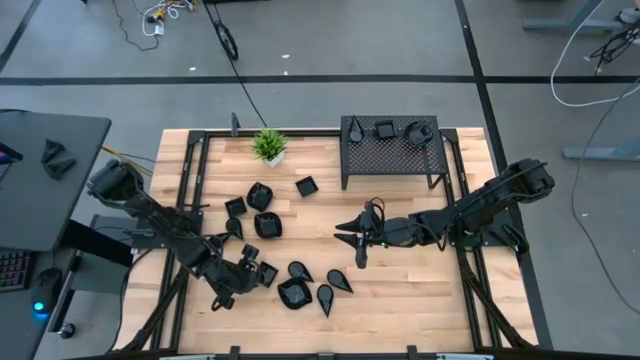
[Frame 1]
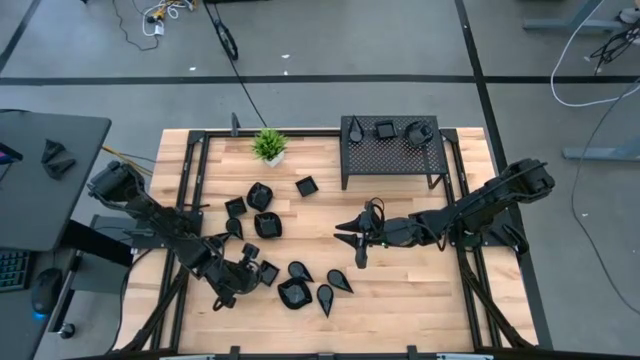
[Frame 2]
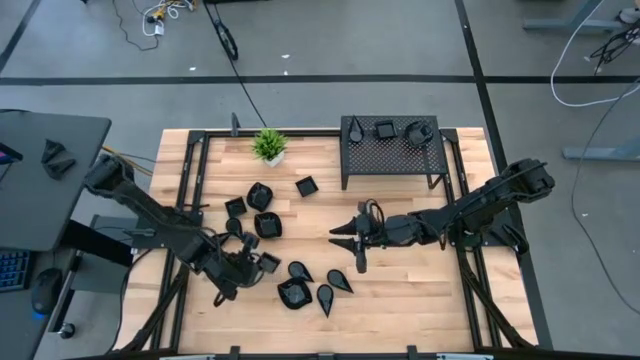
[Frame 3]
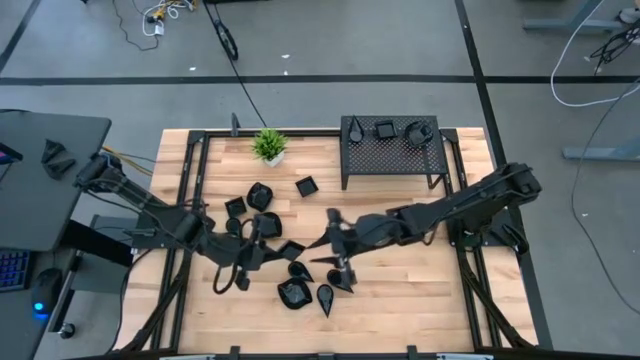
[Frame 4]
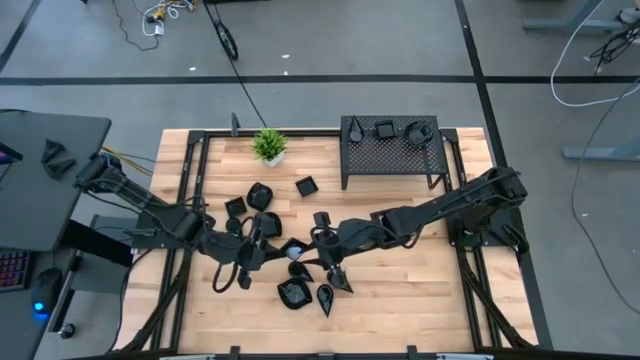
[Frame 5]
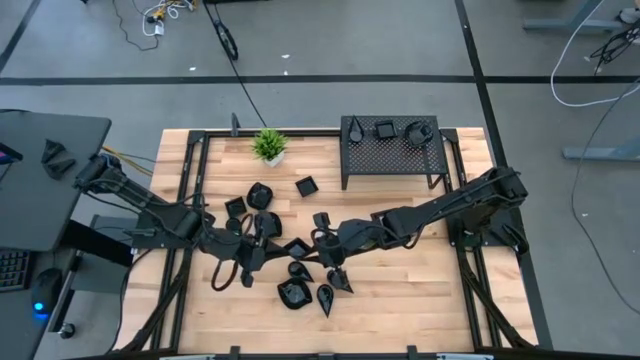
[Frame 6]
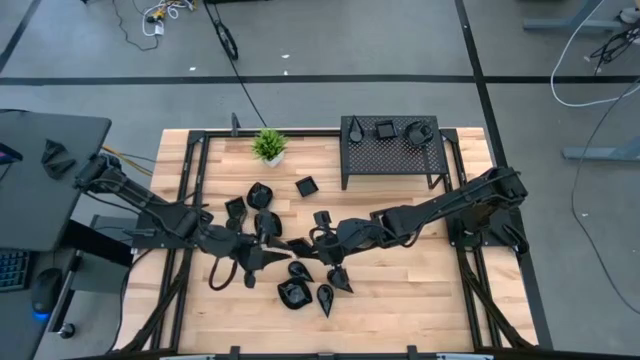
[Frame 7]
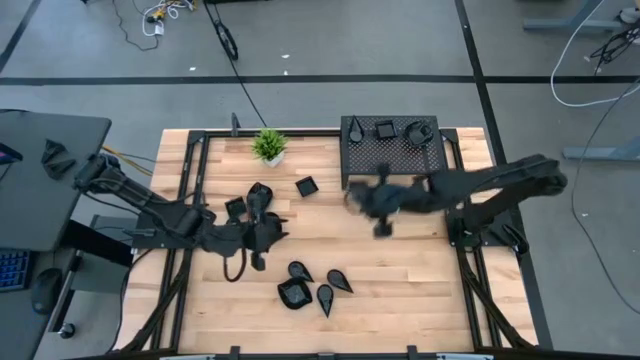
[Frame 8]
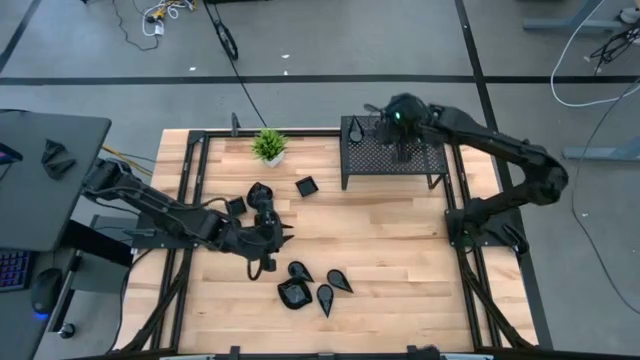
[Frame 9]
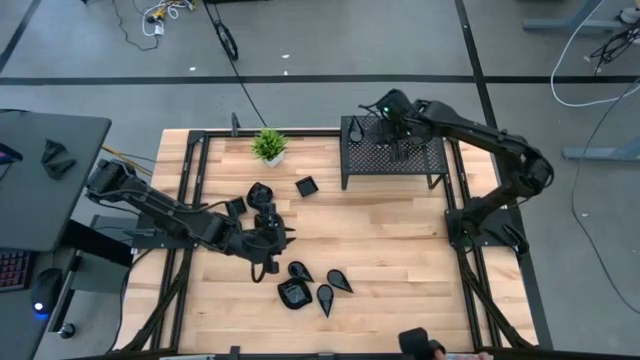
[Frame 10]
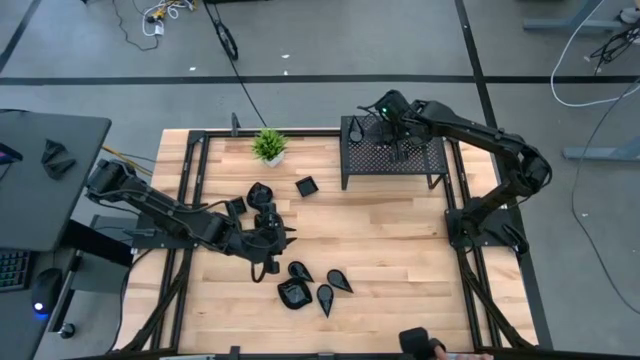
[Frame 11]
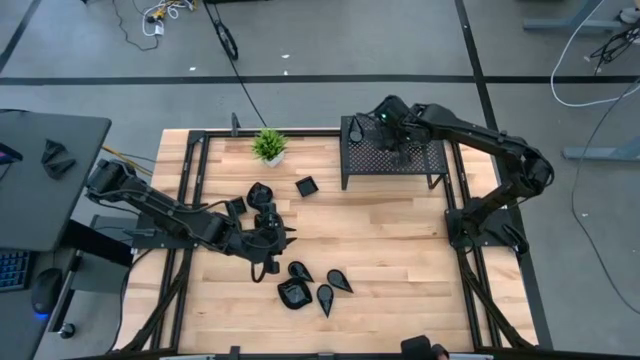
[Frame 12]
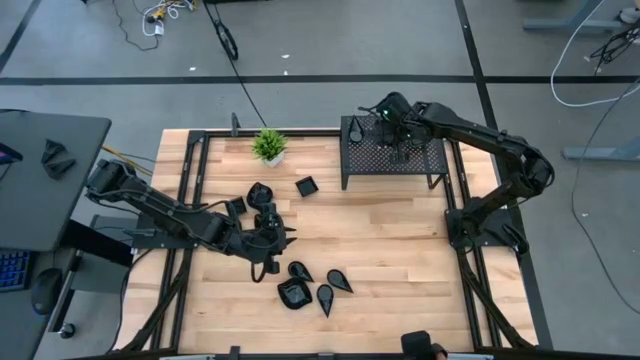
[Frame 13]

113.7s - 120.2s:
Task: Pick & Place Mini shaped plates
Stack the black square plate on top of the black square plate on the shelf

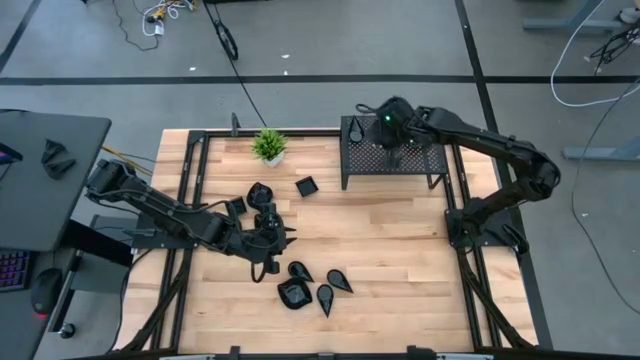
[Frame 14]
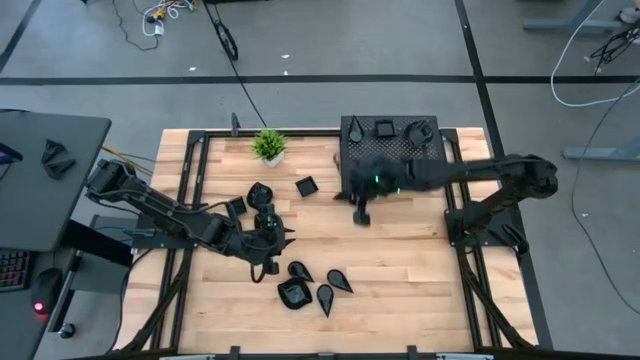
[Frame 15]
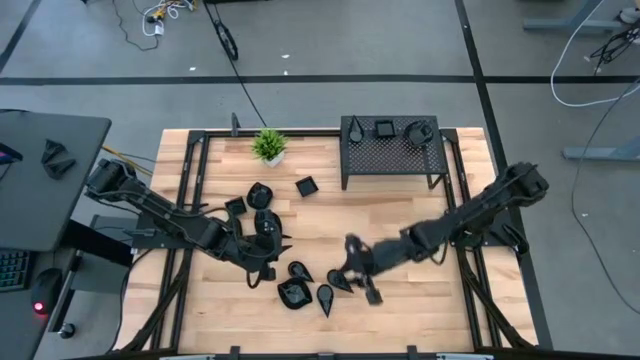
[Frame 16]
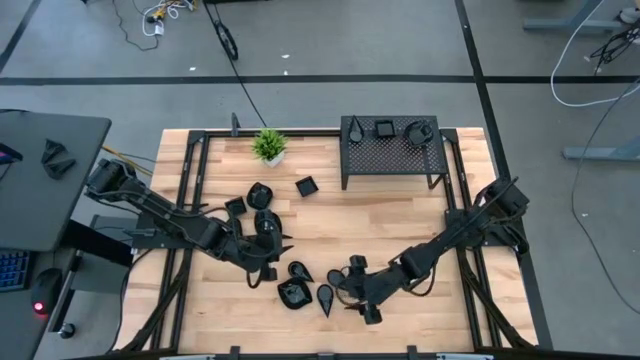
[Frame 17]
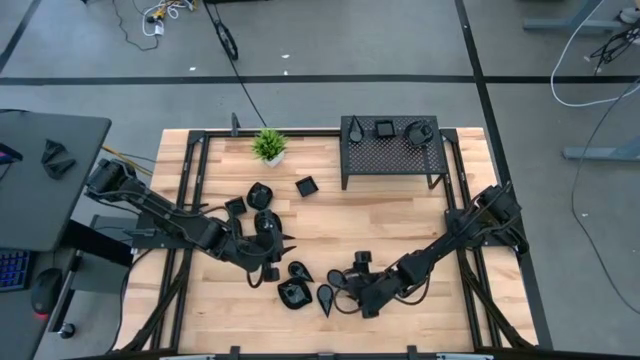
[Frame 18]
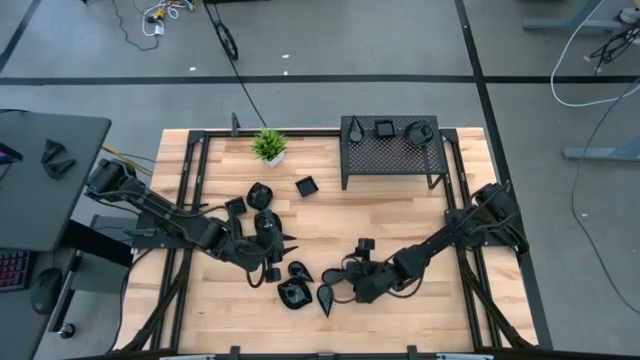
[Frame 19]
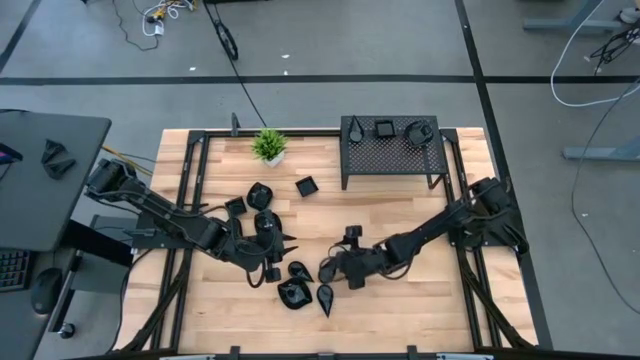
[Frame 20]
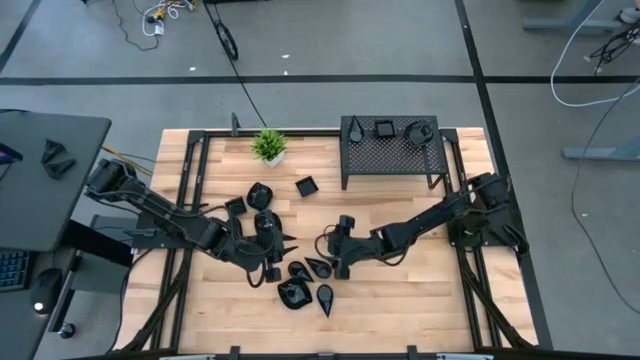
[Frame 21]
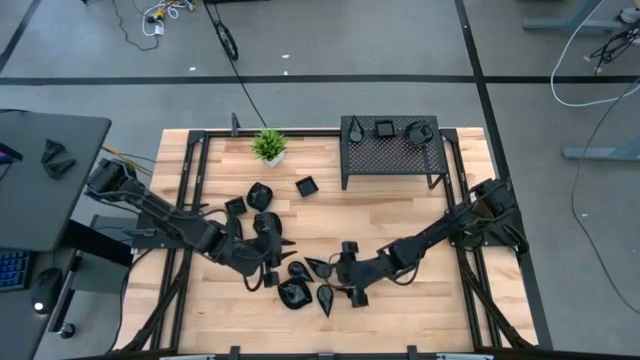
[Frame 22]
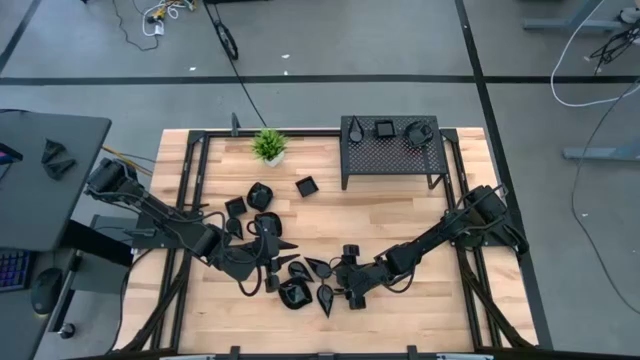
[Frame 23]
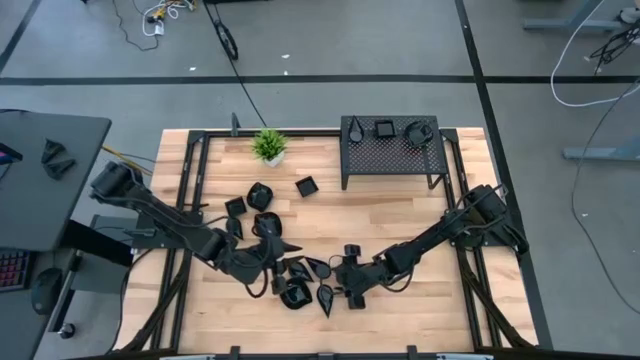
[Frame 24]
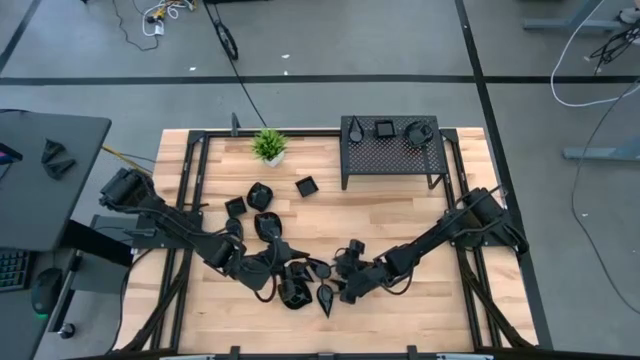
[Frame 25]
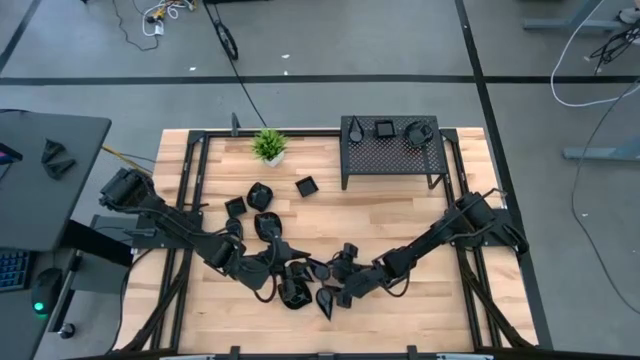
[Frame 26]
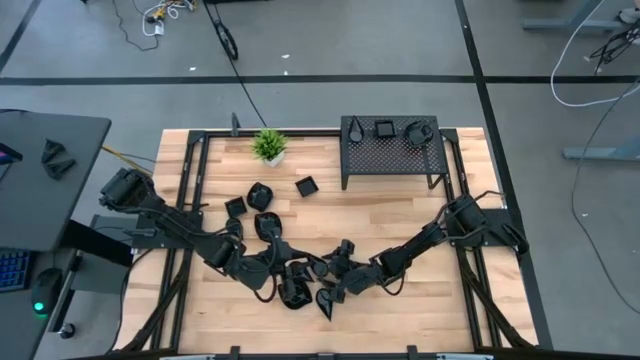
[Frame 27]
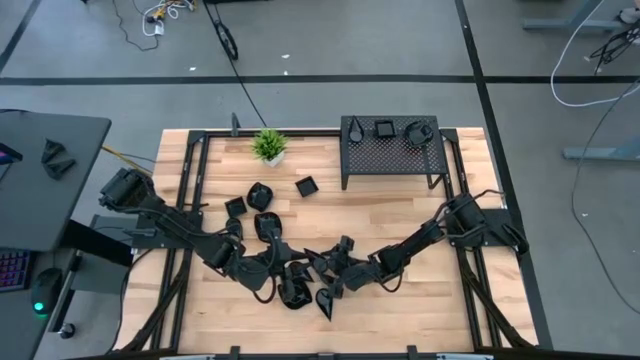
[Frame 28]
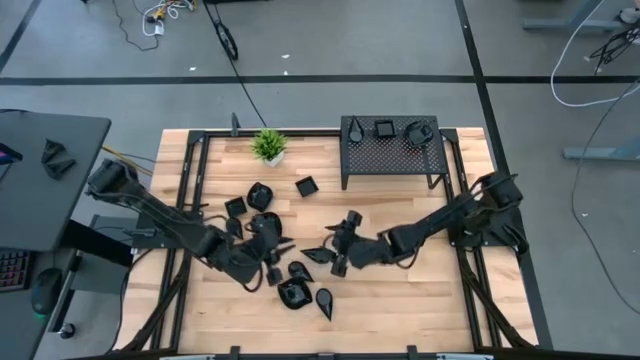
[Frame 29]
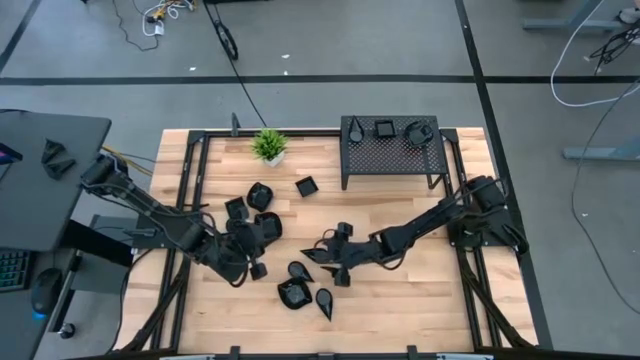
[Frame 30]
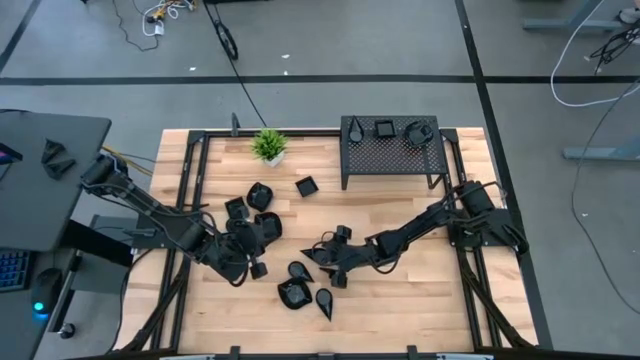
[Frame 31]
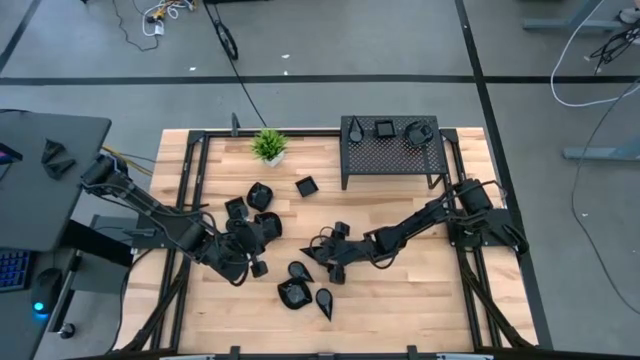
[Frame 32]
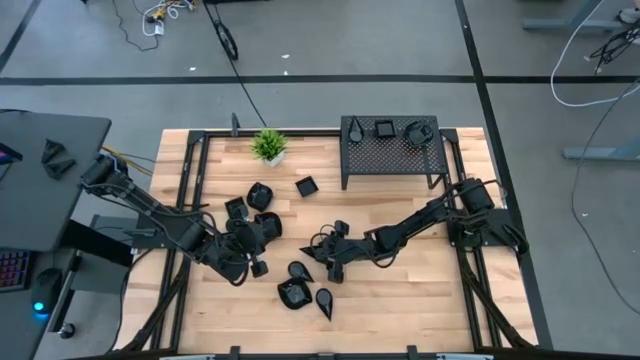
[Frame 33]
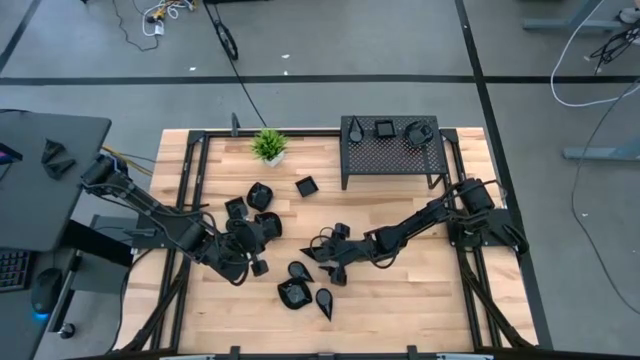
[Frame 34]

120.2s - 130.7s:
Stack the black drop-shaped plate on top of the black drop-shaped plate on the shelf

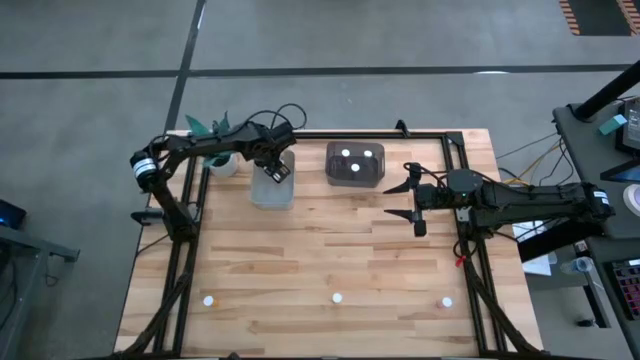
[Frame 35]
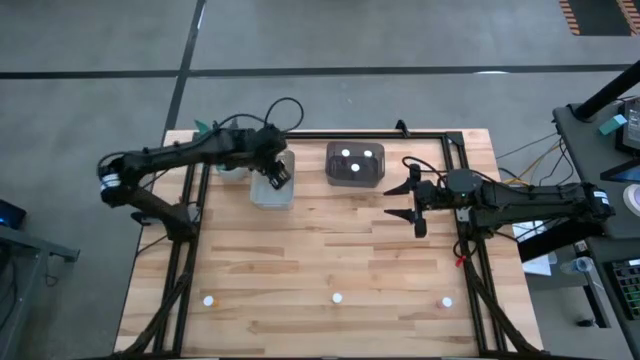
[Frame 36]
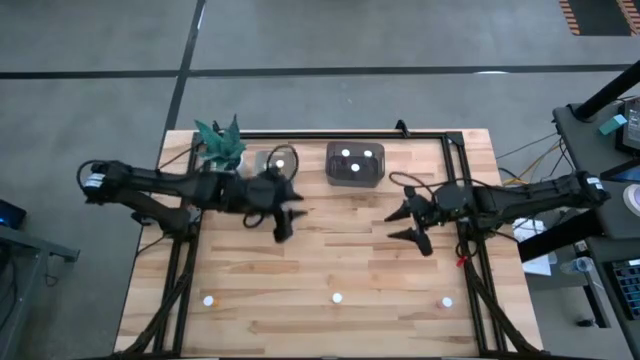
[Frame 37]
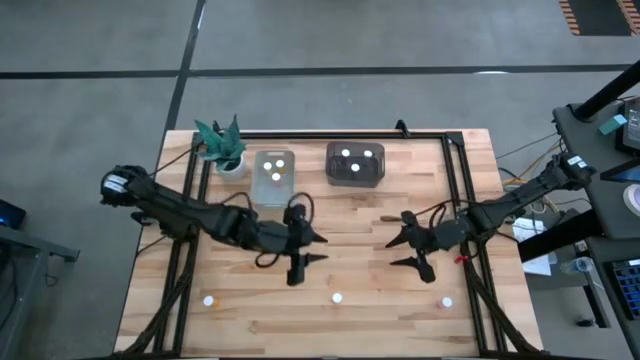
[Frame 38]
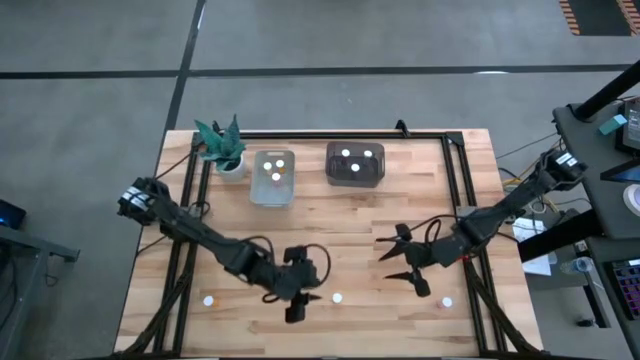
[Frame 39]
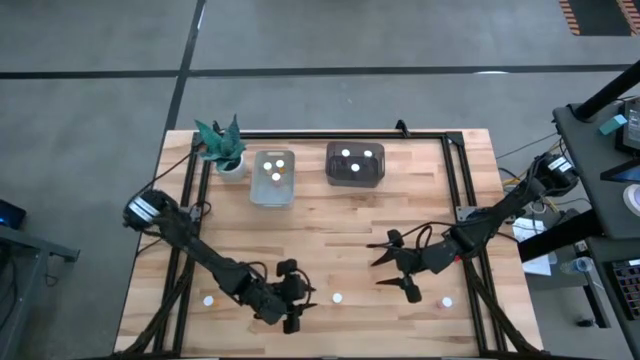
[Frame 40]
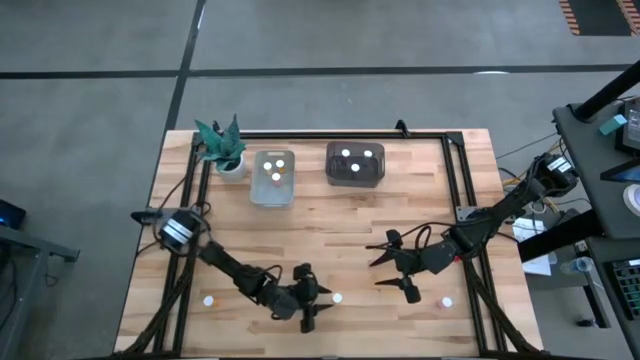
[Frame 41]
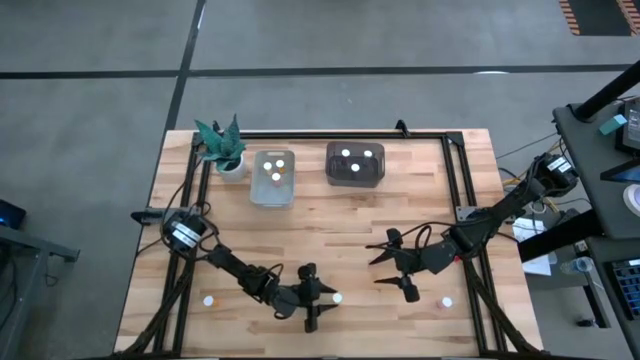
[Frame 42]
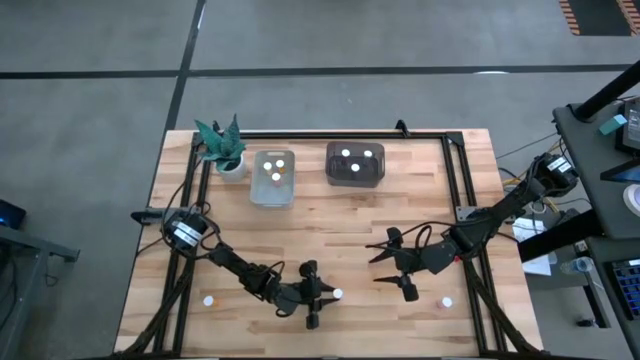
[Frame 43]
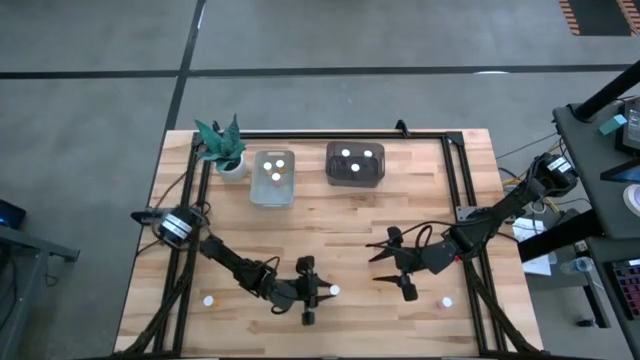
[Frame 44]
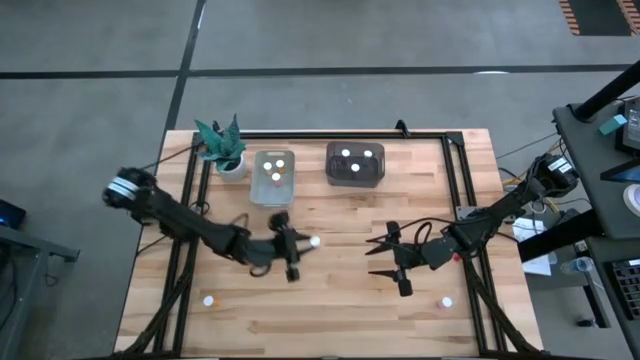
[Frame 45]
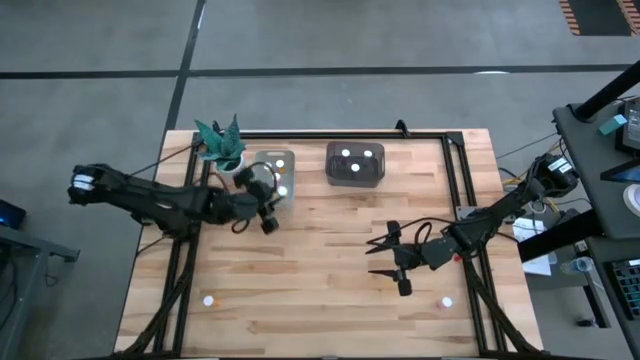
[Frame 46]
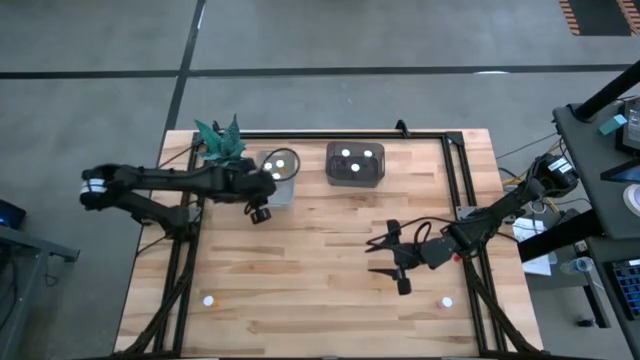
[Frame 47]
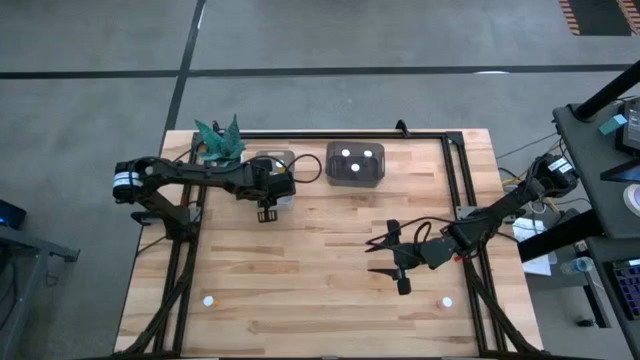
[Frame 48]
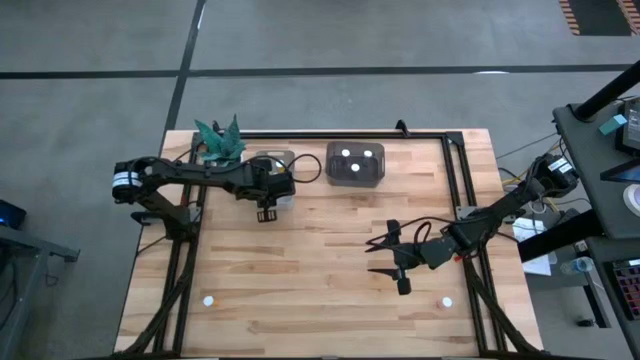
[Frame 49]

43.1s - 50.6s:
Task: Pick and place medicine bottles into bin by pill shape (circle, oval)
Put the right orange tablet bottle into the gray bin
